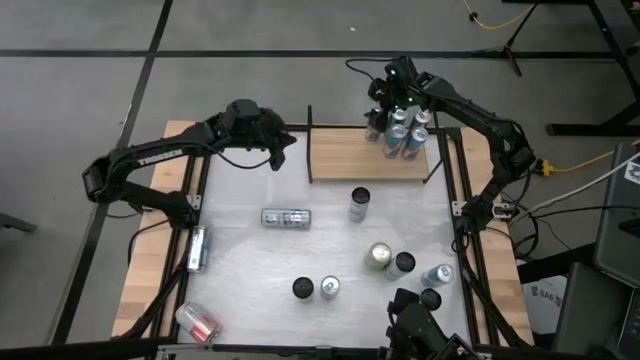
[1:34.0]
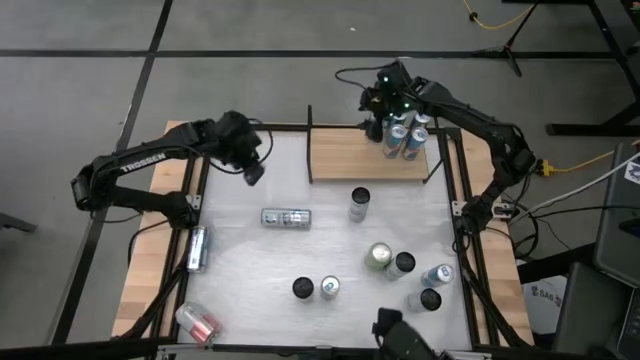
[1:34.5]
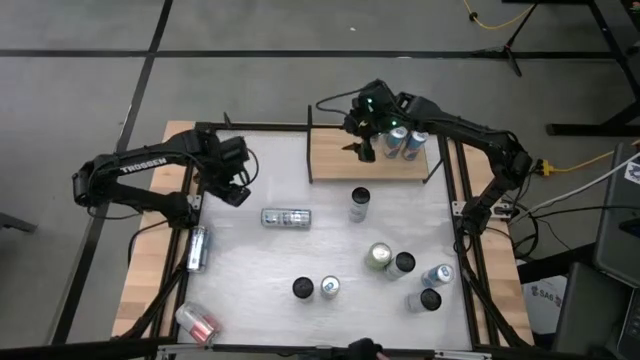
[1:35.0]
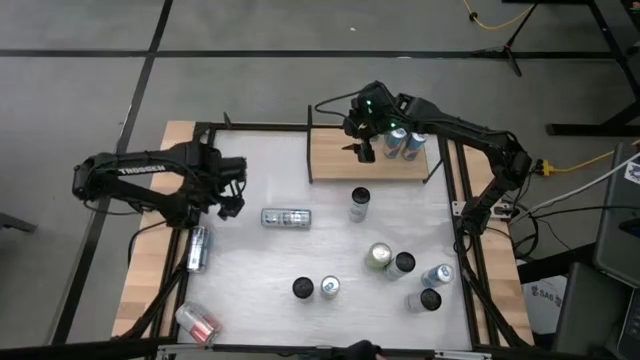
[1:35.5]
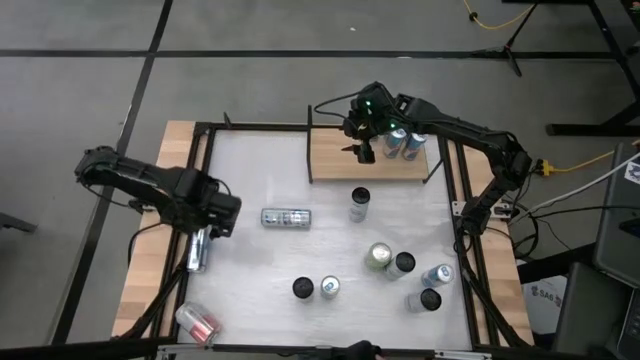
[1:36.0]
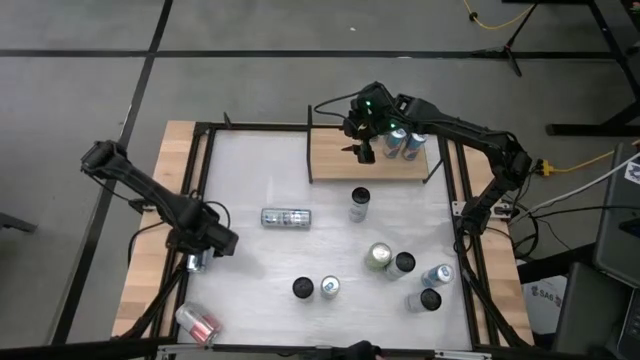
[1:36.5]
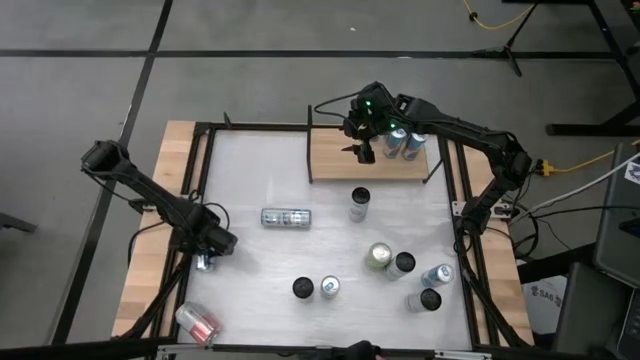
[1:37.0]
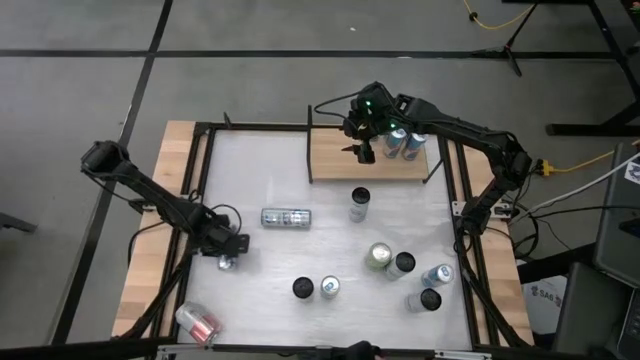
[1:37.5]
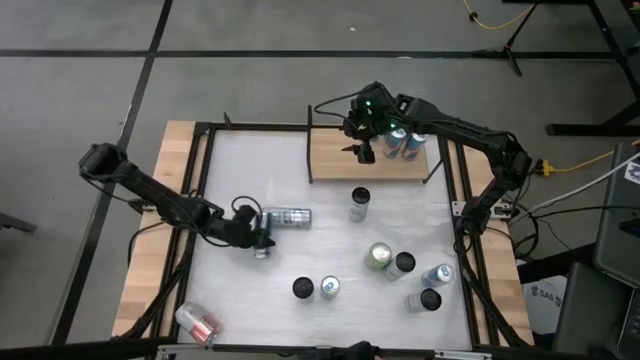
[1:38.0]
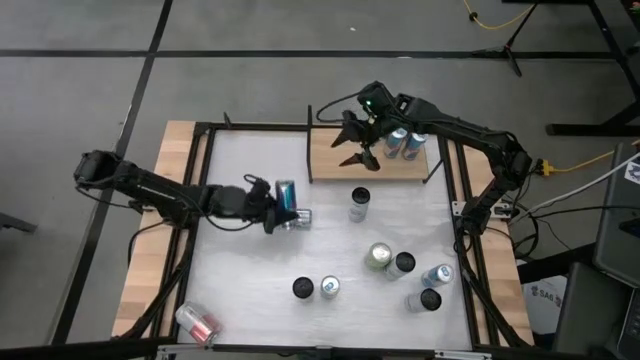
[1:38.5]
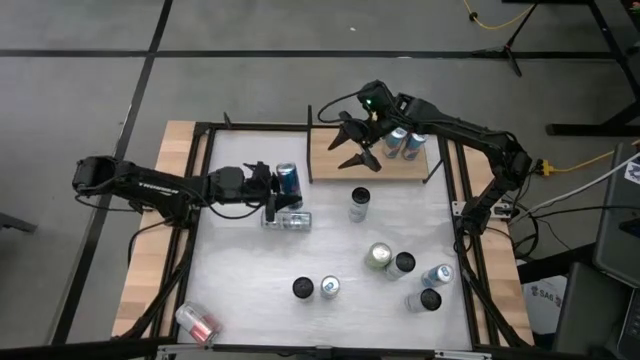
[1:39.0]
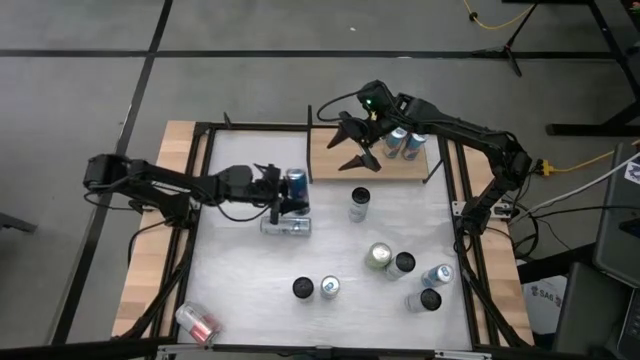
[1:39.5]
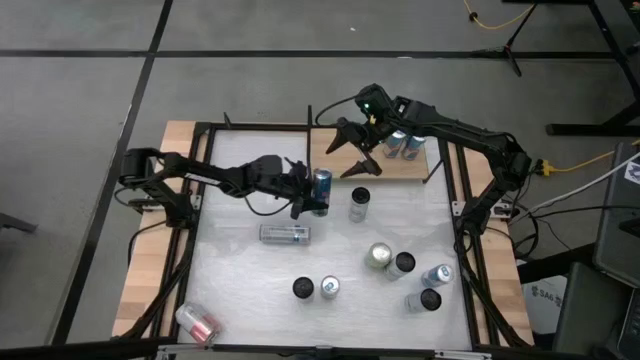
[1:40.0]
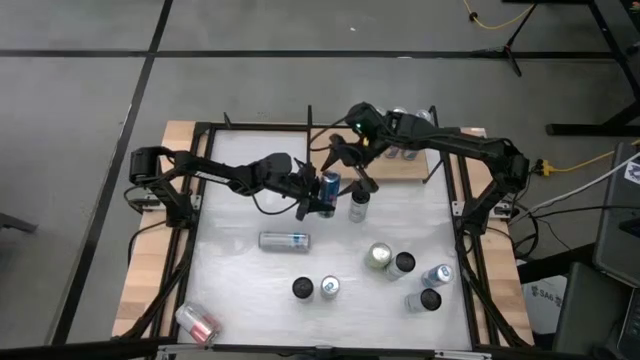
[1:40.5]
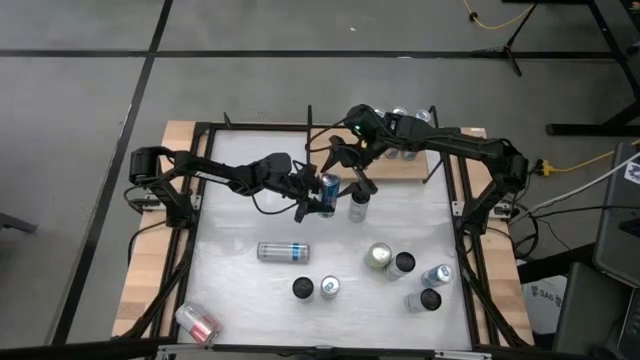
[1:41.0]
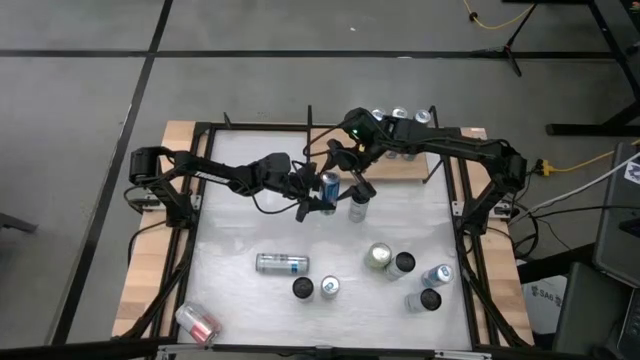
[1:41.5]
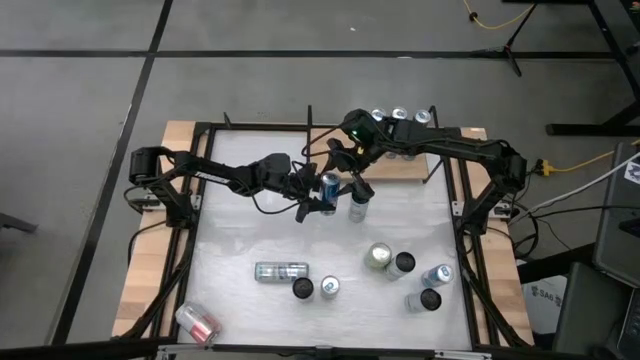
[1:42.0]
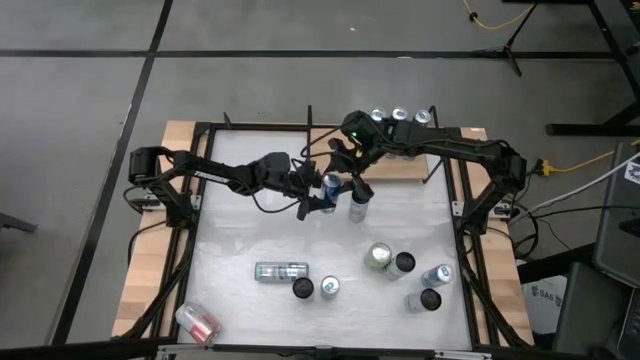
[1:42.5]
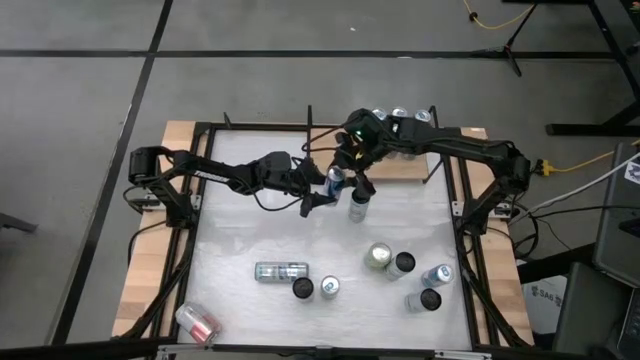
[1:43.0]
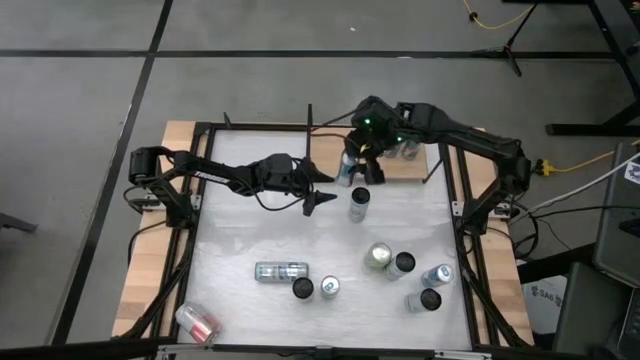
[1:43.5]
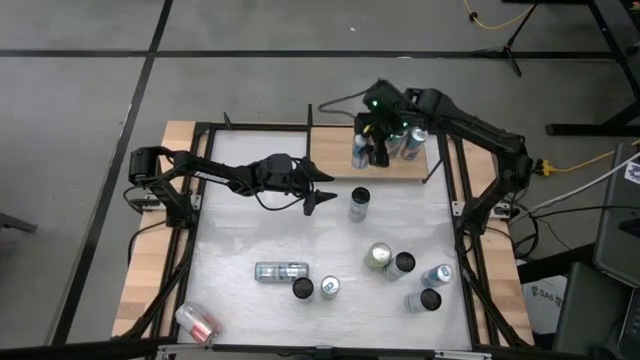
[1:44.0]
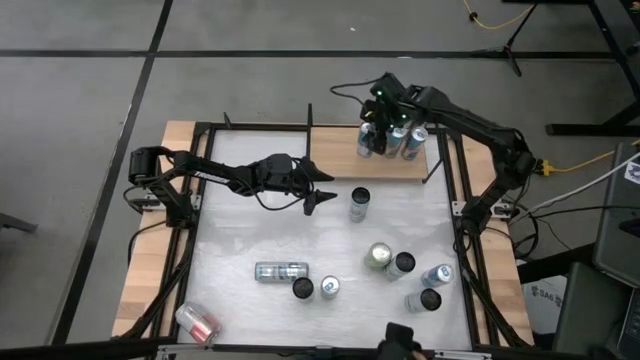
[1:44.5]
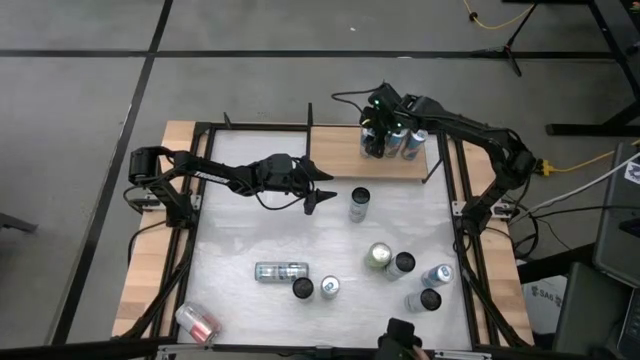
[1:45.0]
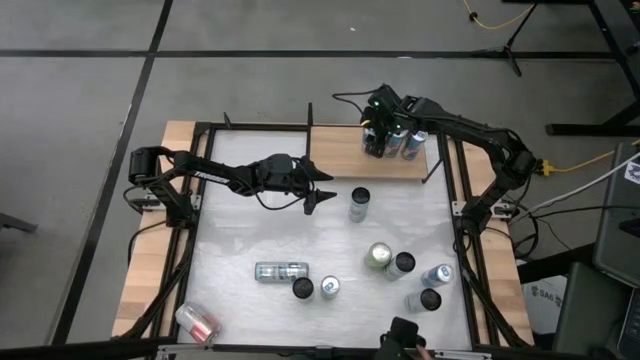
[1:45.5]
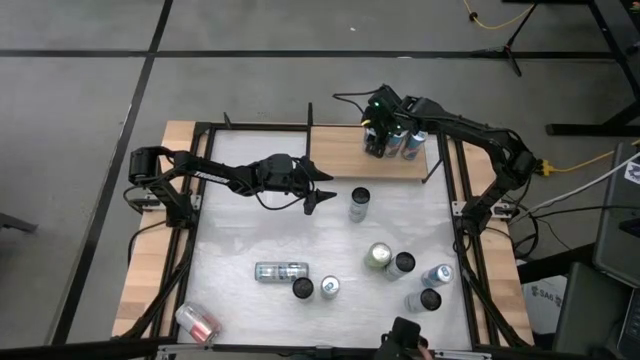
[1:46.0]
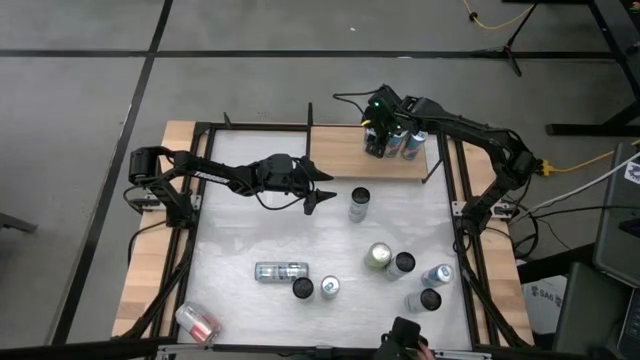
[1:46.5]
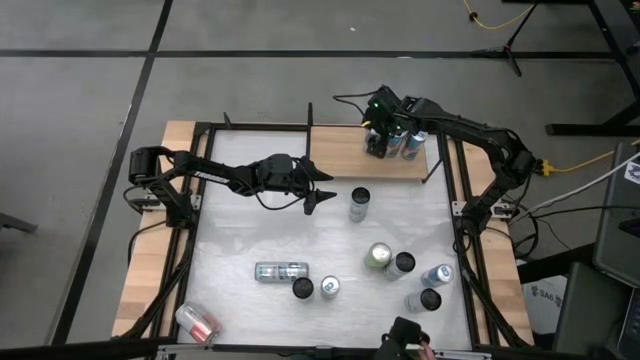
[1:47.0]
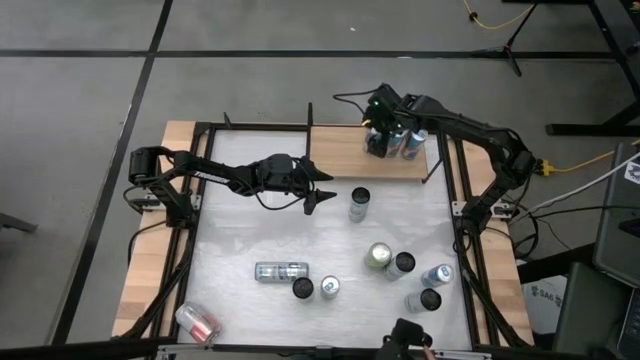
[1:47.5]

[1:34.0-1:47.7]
Task: Place canned beverage on shelf
Put the blue soda can on the shelf aligned with the other blue soda cans

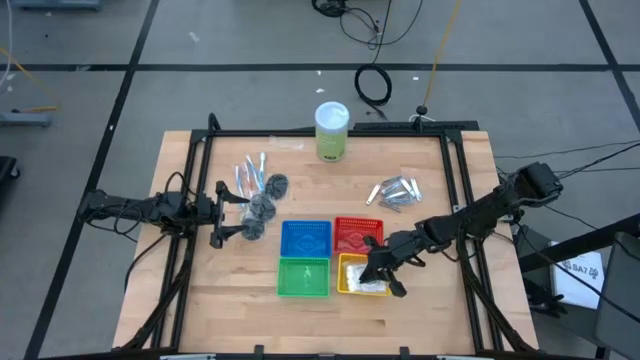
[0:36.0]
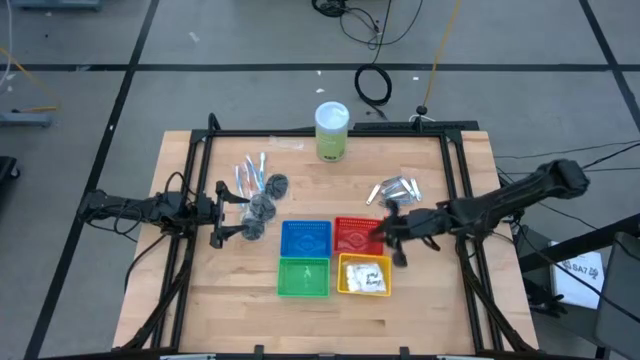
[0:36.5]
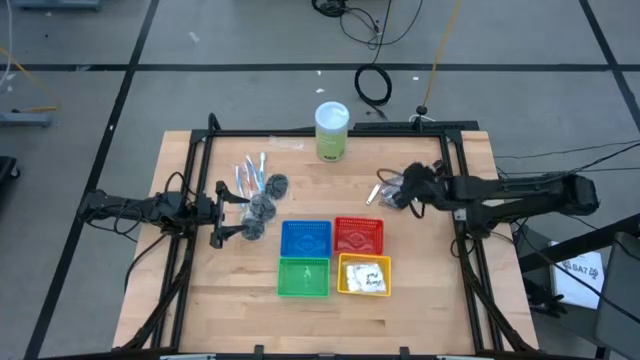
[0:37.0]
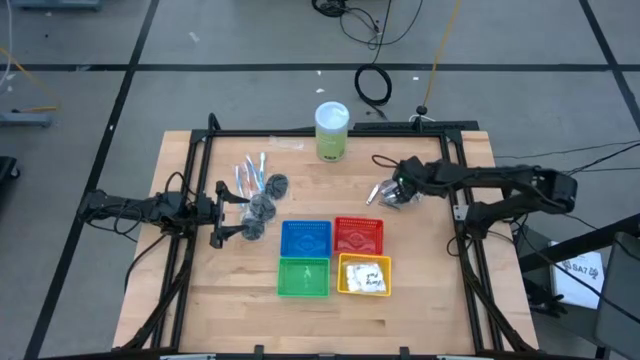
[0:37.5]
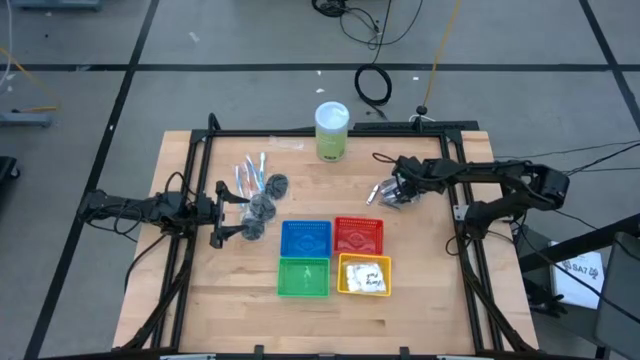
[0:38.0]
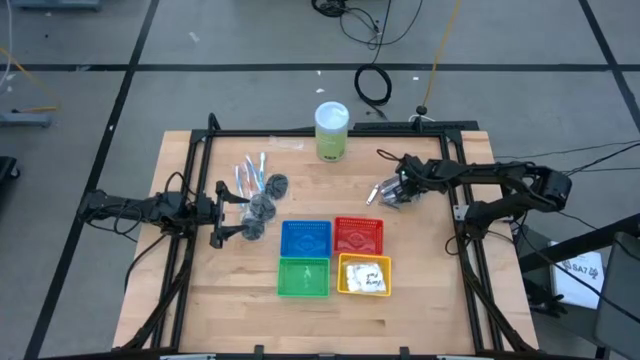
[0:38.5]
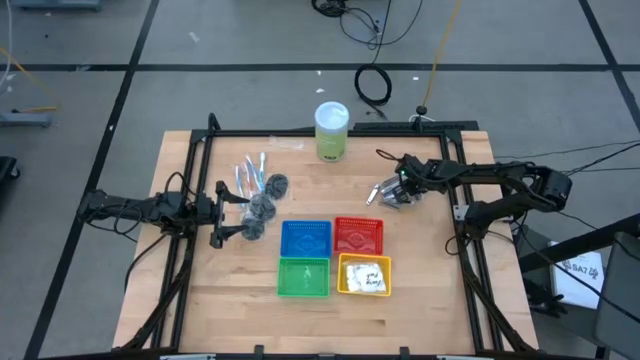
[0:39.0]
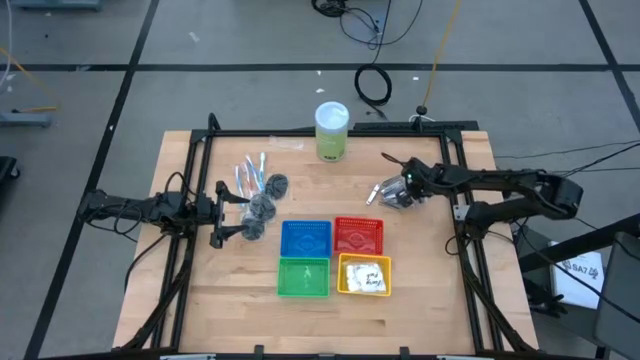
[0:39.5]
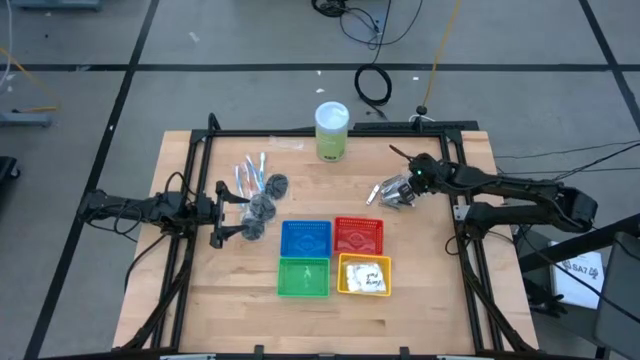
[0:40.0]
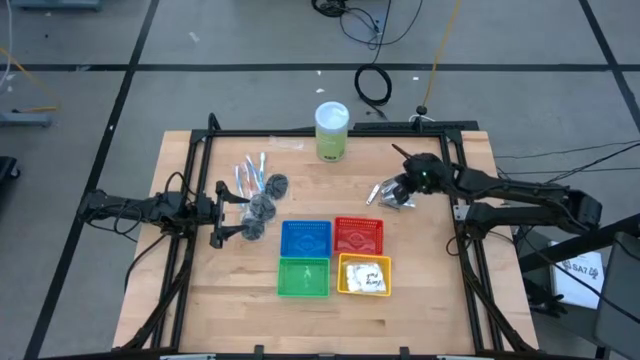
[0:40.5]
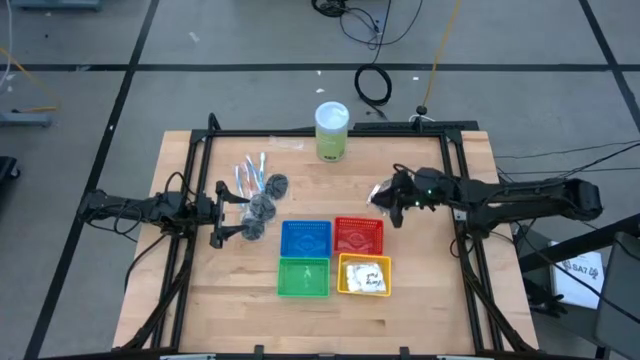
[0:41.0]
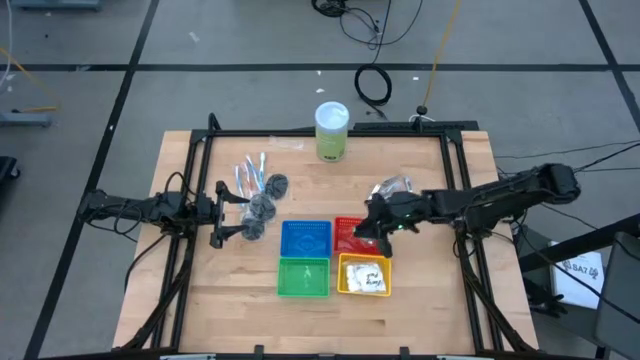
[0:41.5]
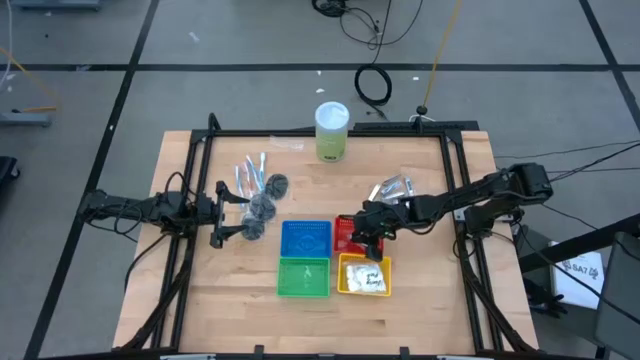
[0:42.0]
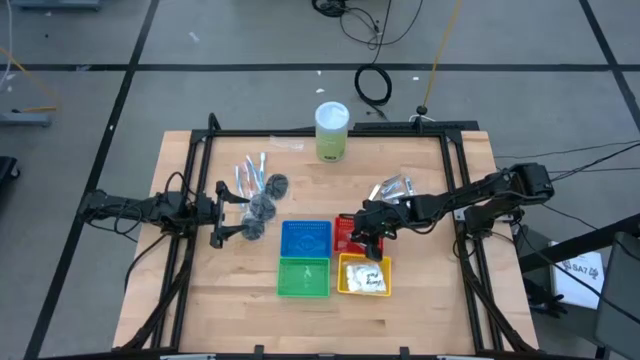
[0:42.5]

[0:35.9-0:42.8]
Task: Pick & Place Travel size toiletries
Put the nail cutter into the red basket
